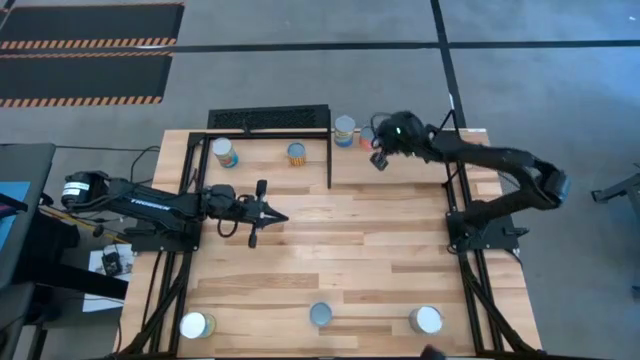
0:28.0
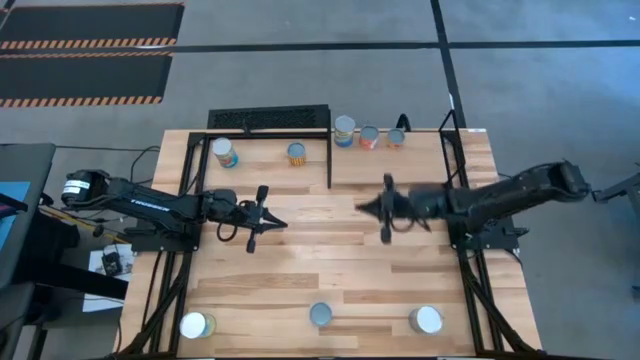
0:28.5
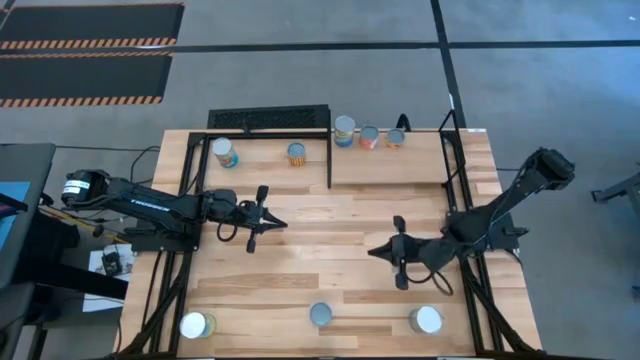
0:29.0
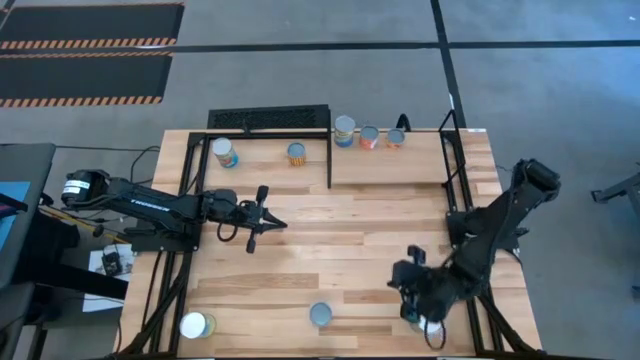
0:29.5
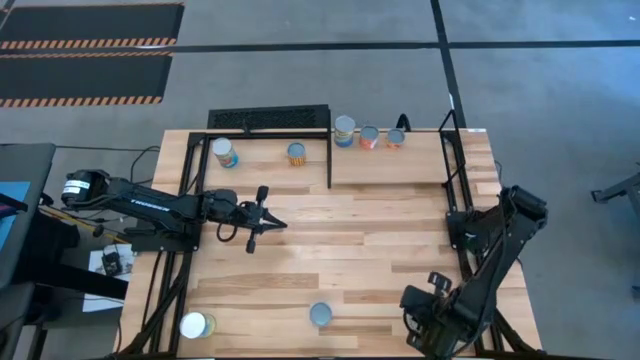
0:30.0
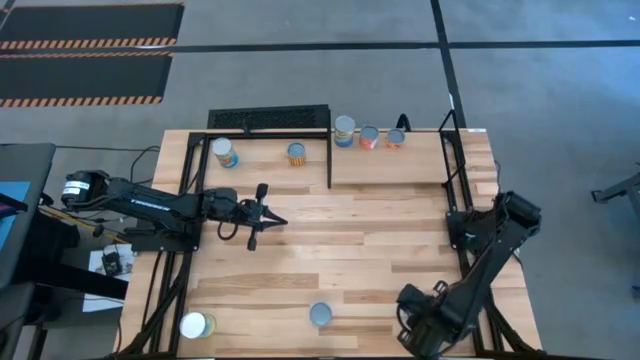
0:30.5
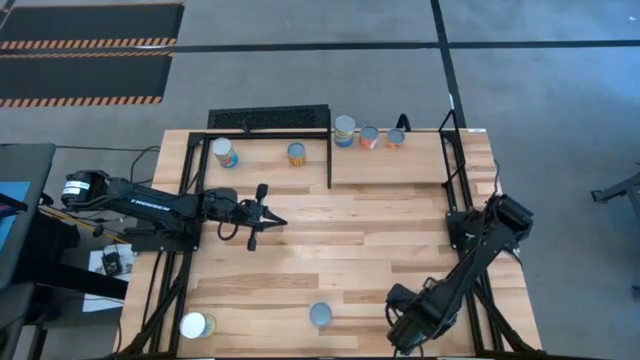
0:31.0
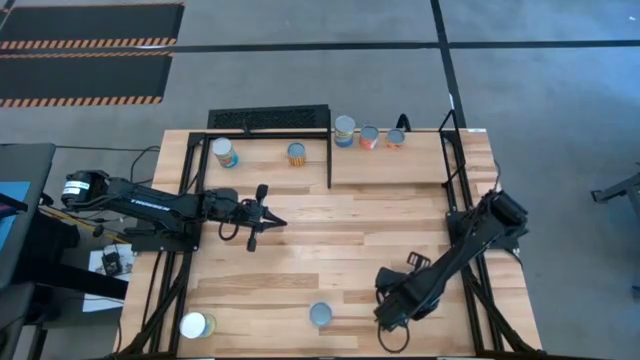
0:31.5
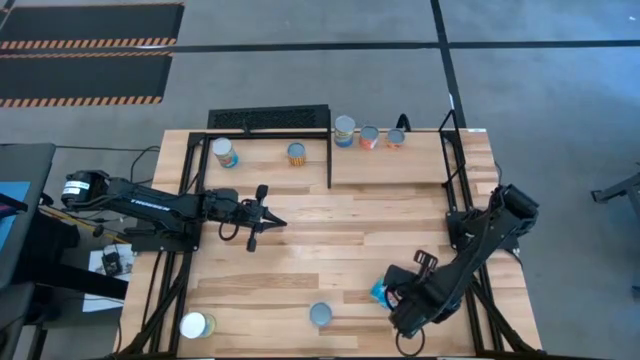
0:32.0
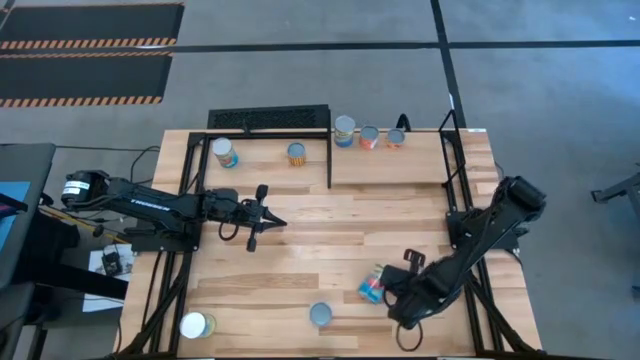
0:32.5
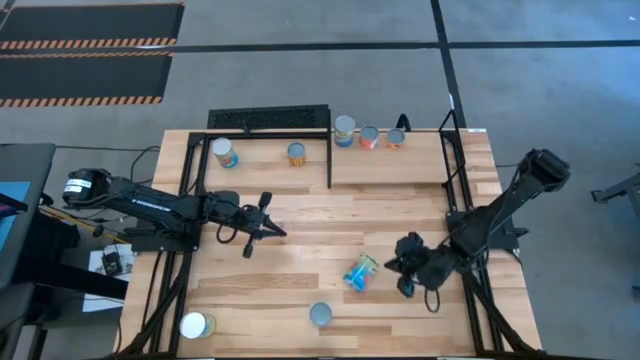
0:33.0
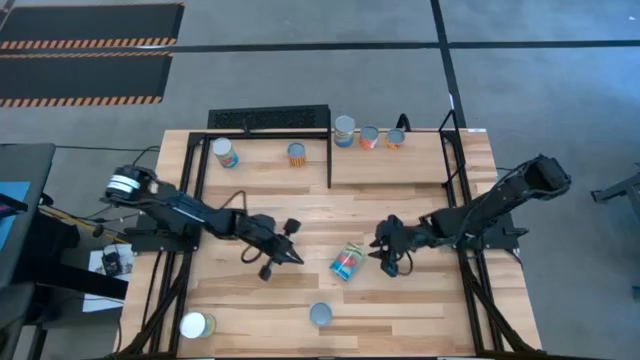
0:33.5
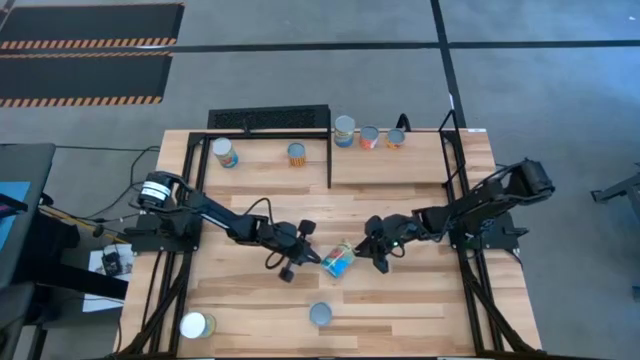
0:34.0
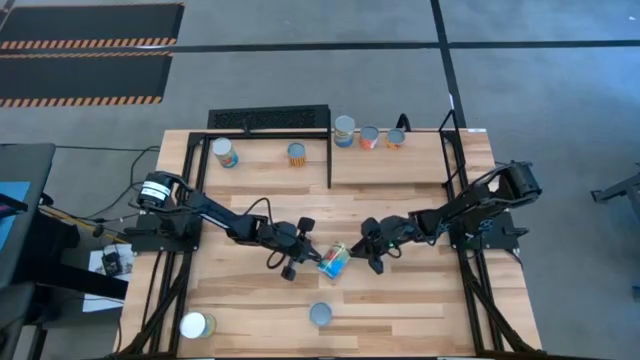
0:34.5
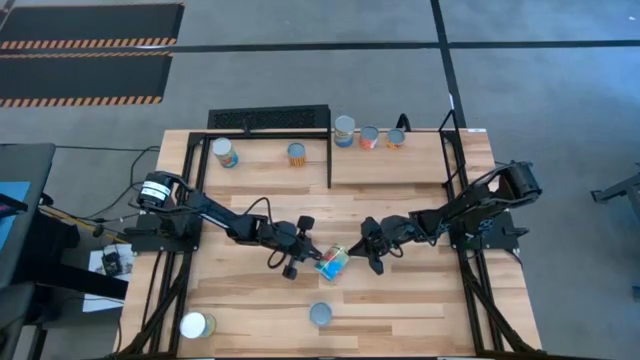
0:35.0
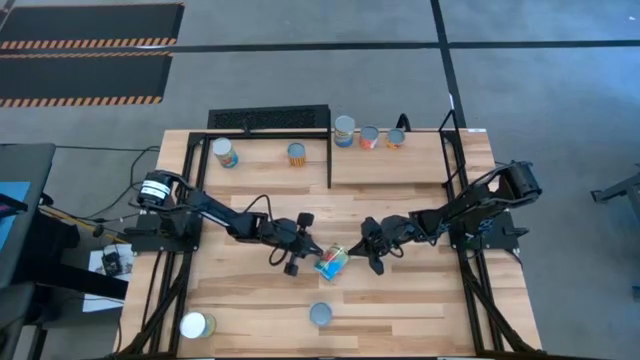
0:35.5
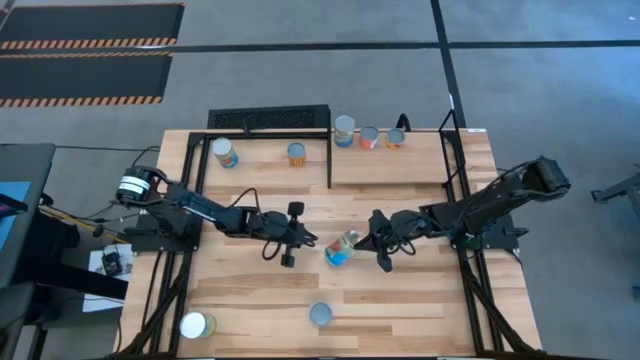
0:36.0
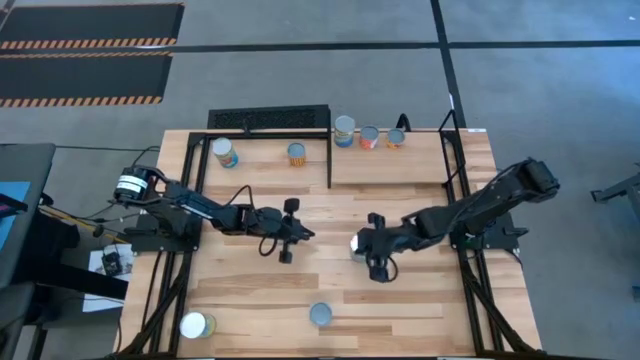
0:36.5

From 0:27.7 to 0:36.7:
Task: Pick and place cans onto a shelf
Put the top bottom canned tomatoes on the shelf

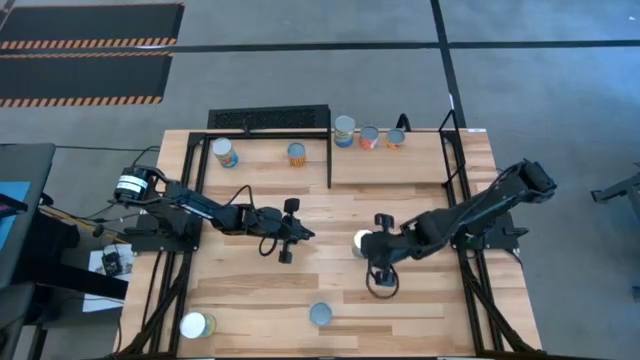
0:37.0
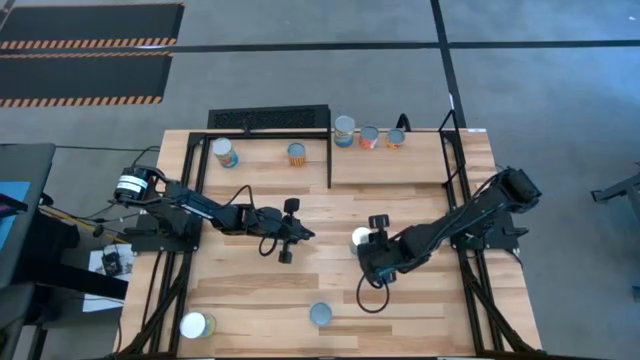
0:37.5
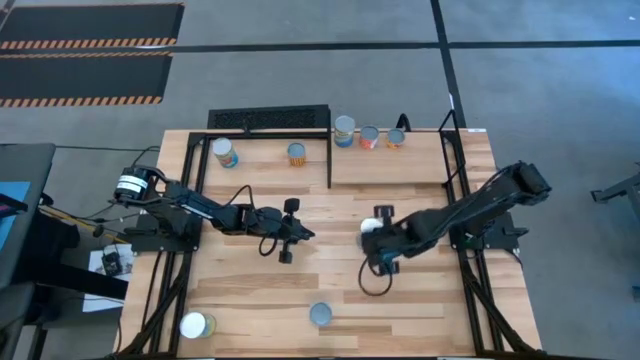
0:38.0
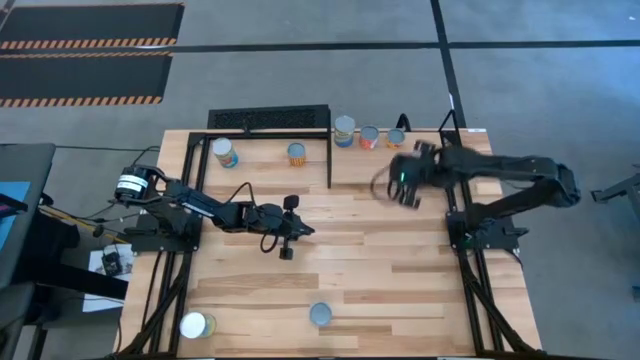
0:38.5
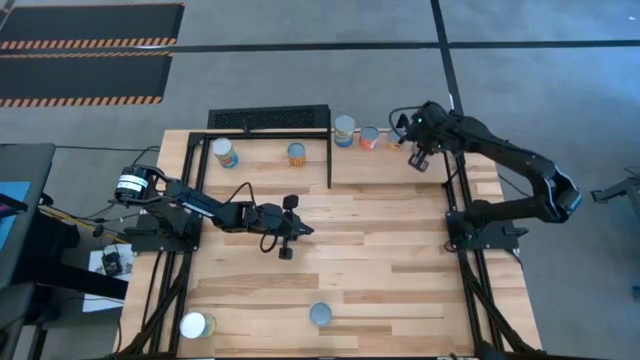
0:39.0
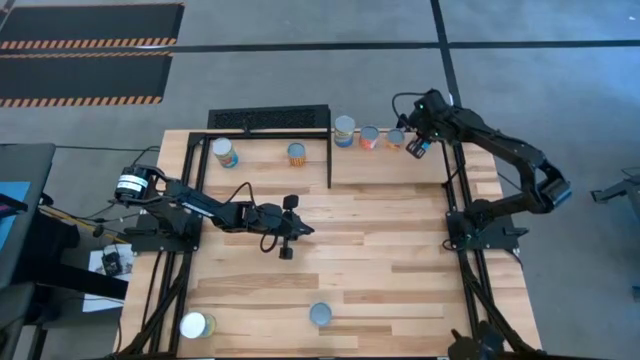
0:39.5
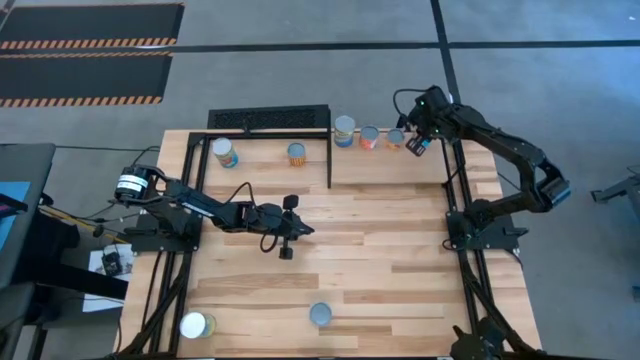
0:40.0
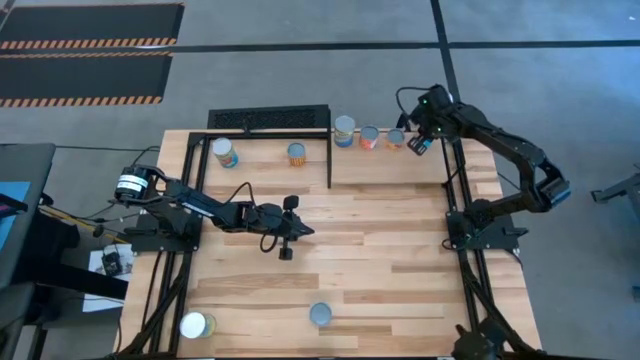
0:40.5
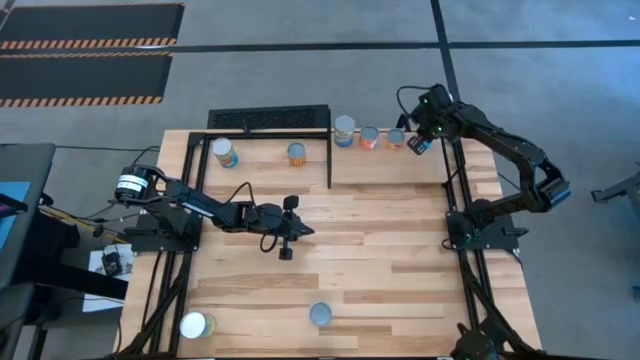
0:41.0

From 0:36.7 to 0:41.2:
Put the top bottom canned tomatoes on the shelf

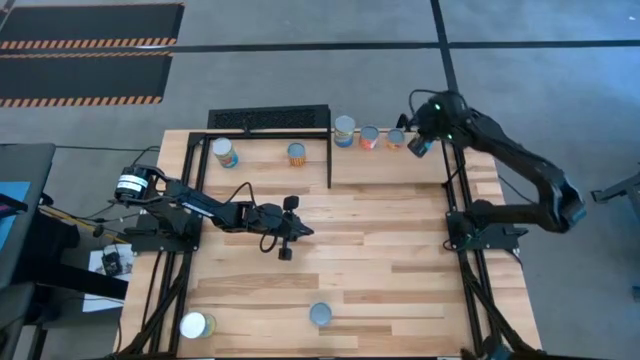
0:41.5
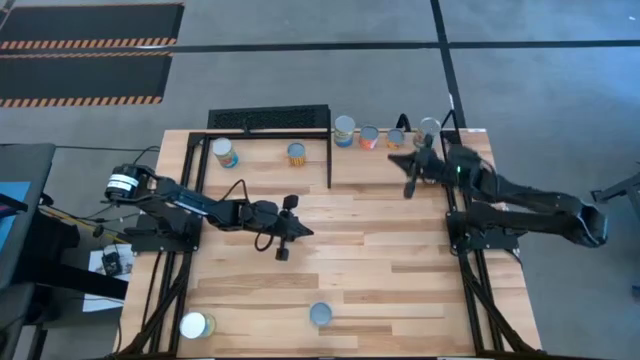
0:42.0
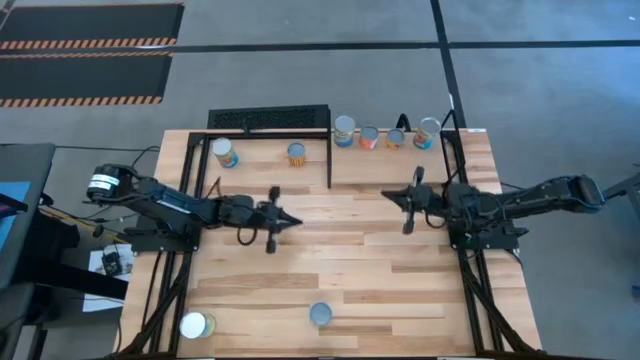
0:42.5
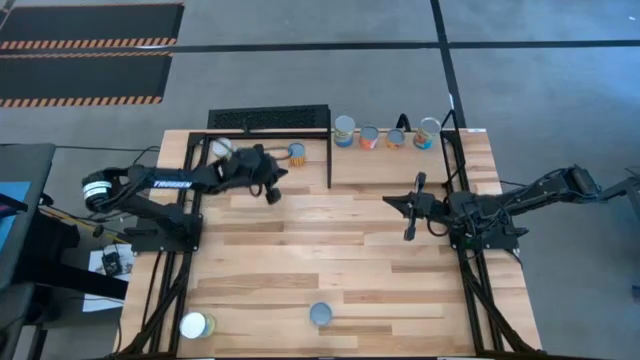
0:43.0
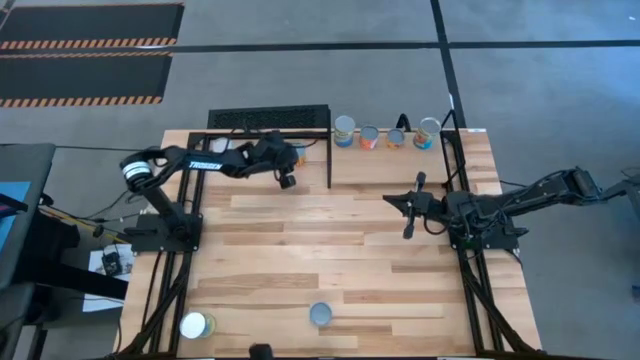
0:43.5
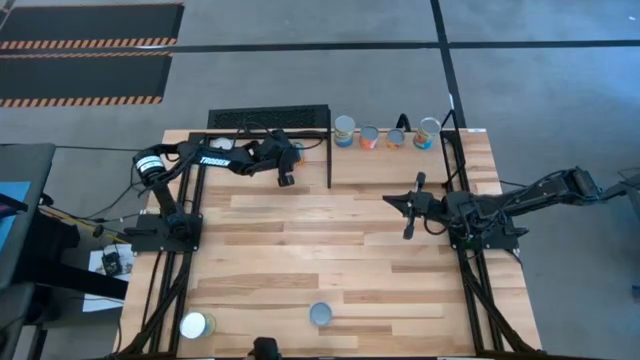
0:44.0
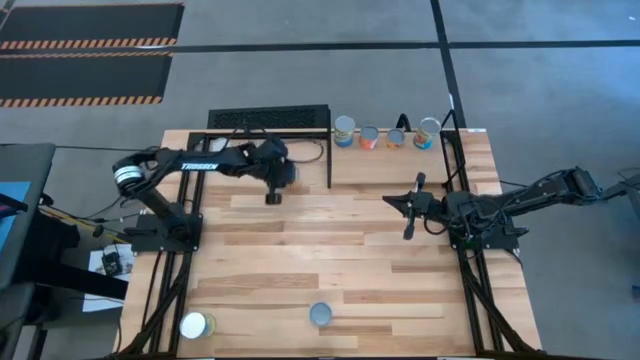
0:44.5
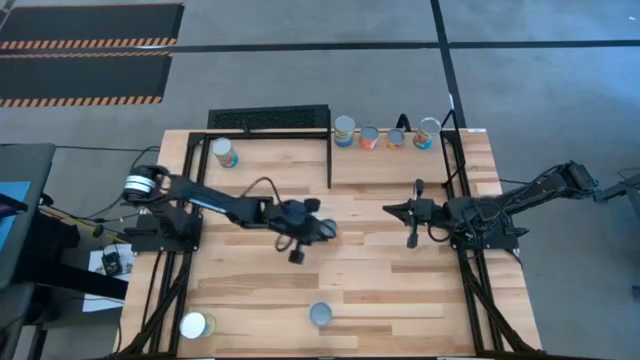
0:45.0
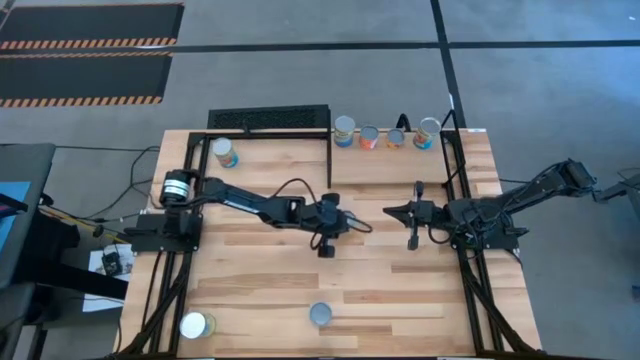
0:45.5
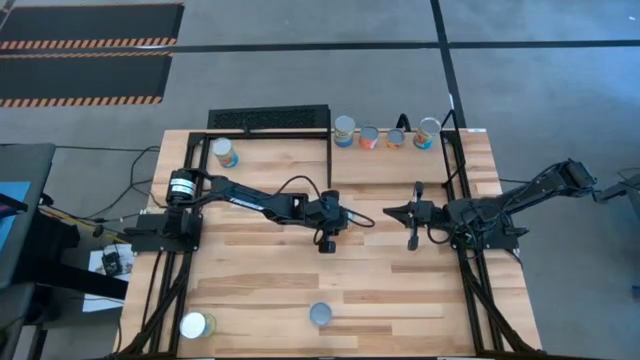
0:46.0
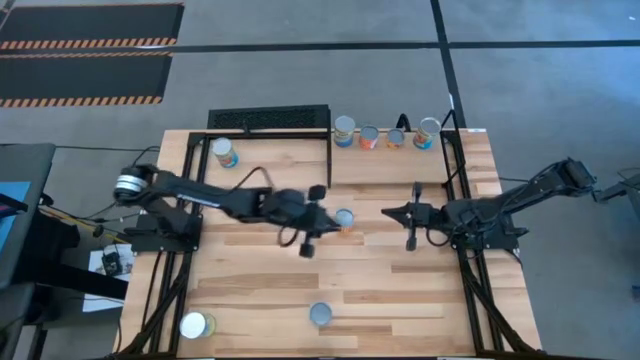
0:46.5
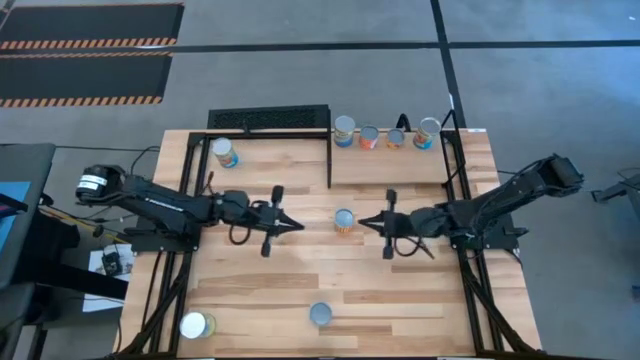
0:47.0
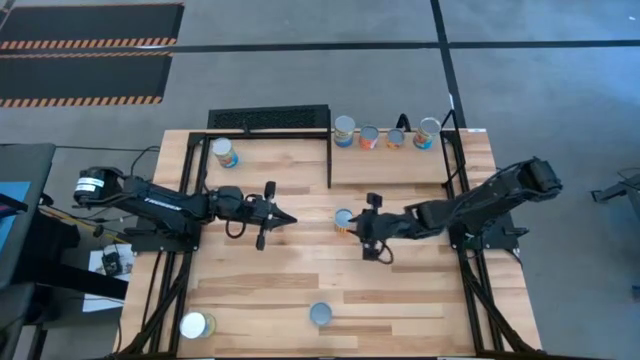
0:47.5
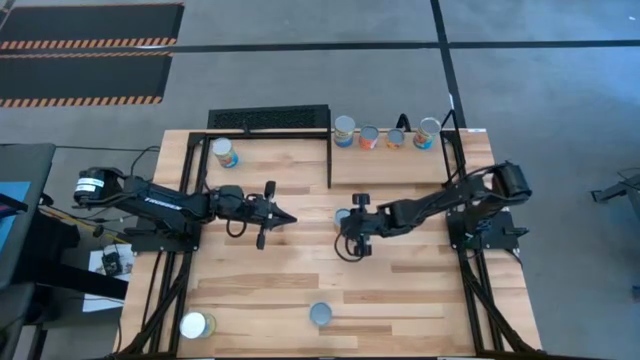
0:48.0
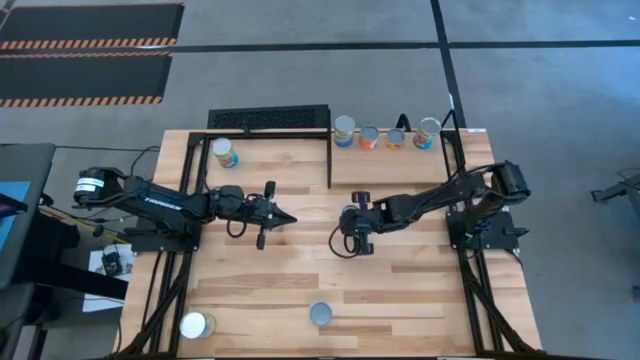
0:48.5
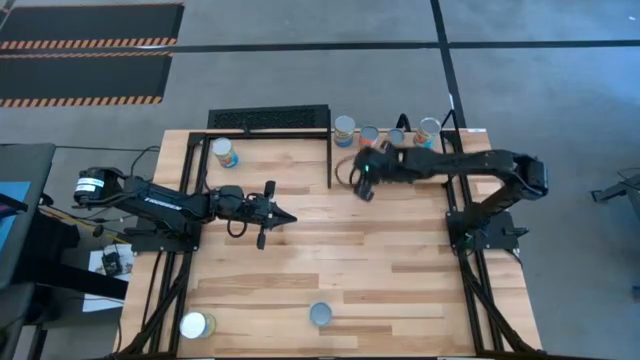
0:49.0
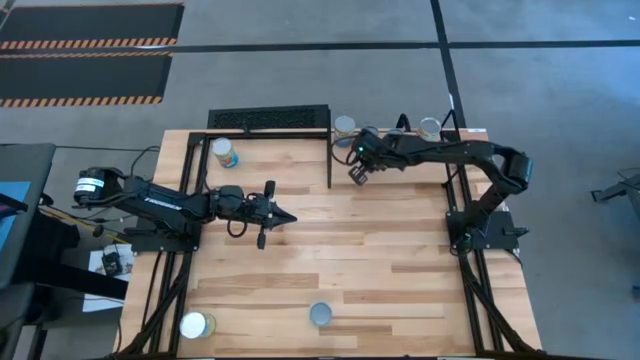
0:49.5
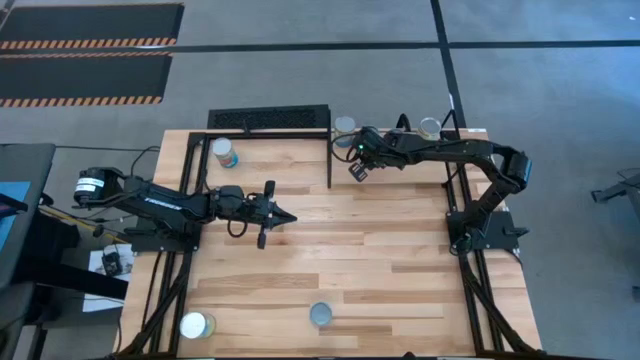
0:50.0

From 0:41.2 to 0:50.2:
Put the yellow canned fruit on the shelf
